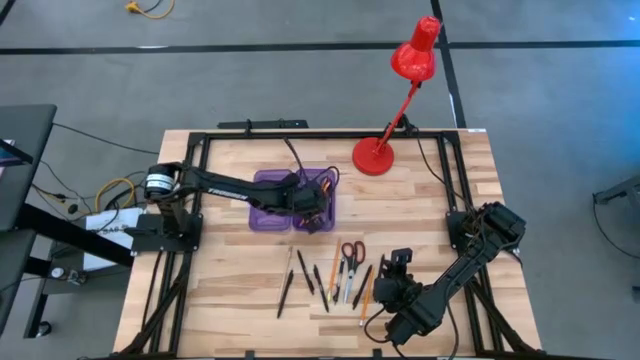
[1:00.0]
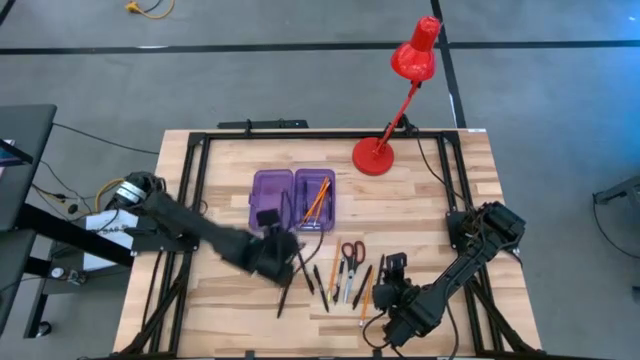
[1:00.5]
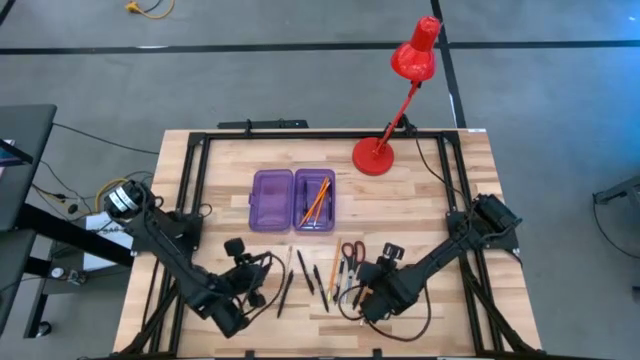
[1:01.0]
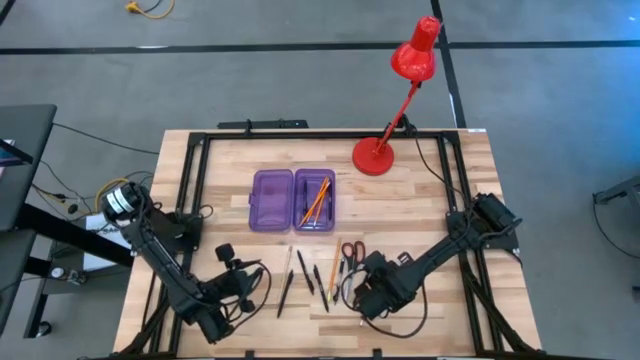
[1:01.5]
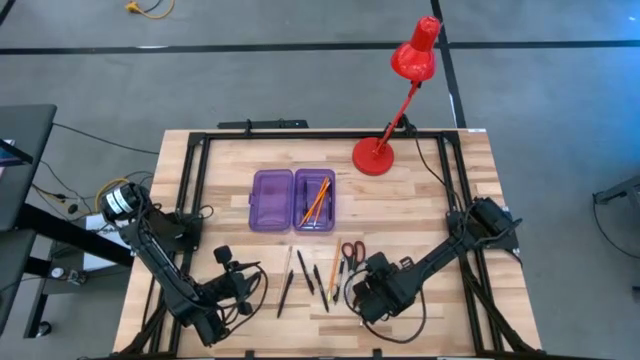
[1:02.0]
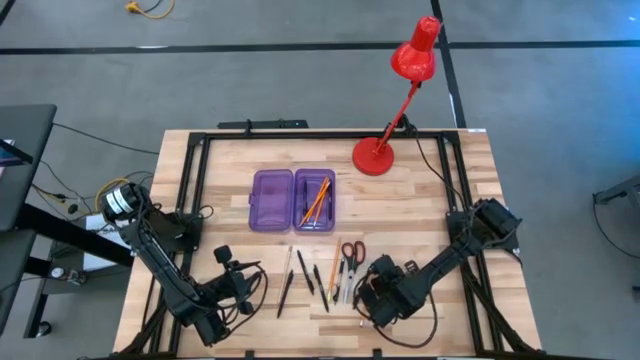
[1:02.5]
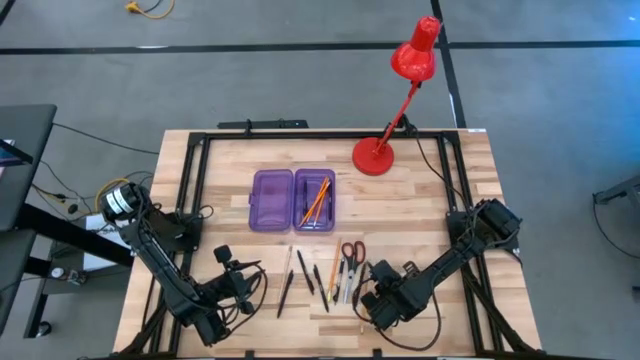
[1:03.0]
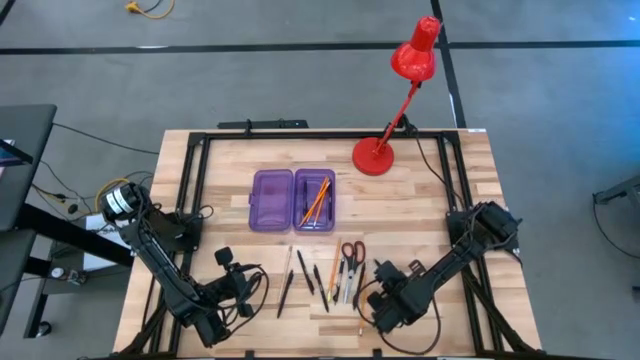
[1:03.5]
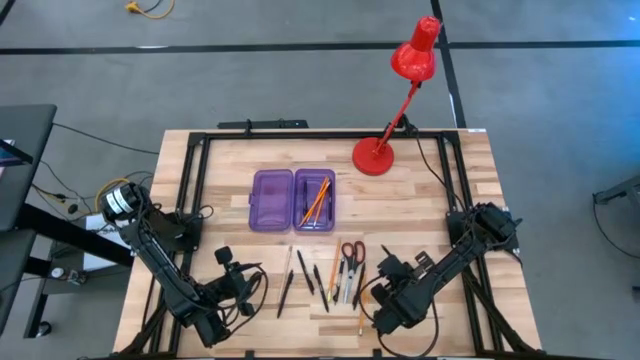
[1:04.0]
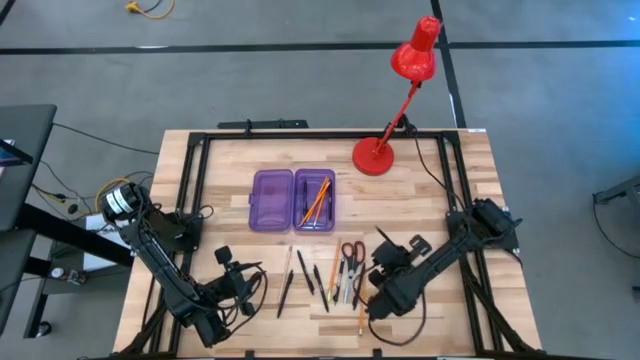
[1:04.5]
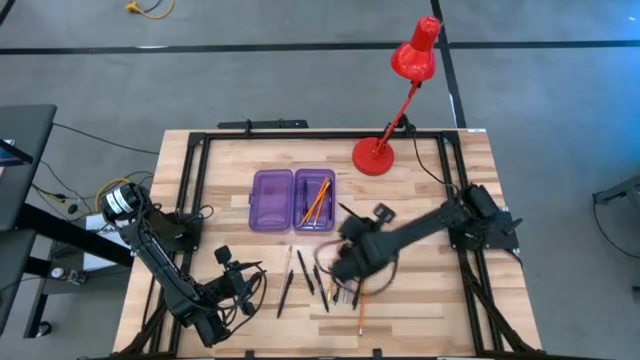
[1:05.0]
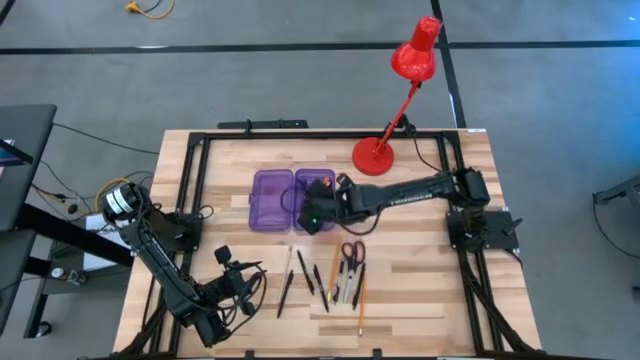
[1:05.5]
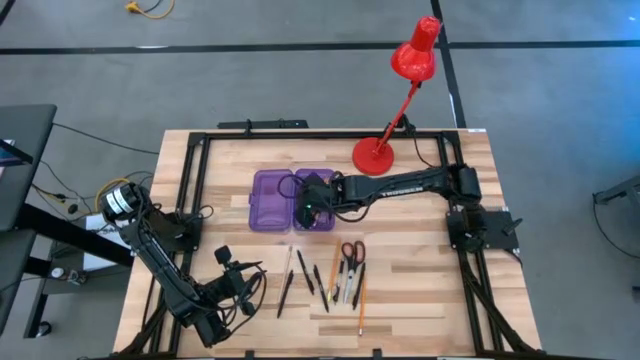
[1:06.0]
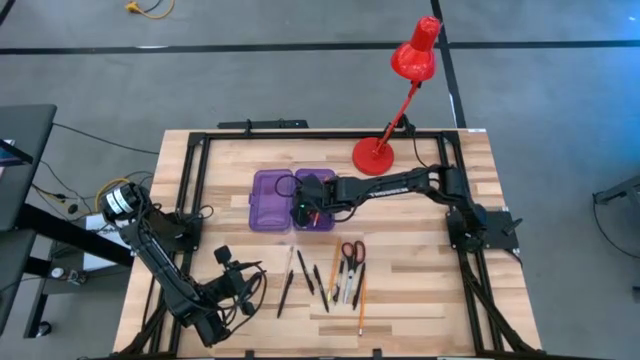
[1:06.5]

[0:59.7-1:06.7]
Task: Pick & place school supplies into a supply box
Put the black pen into the violet supply box

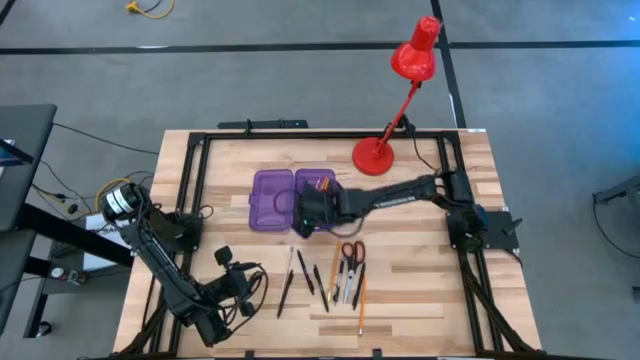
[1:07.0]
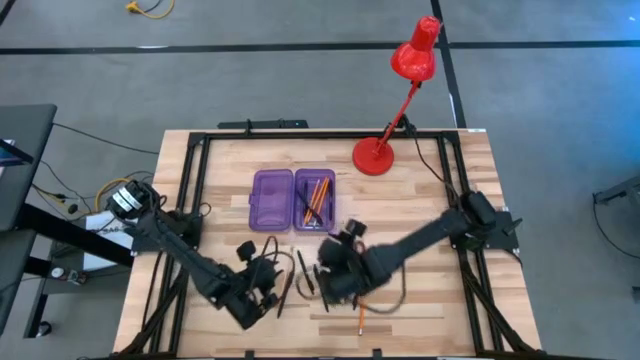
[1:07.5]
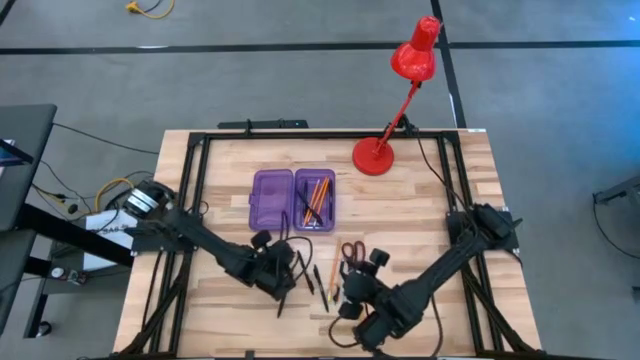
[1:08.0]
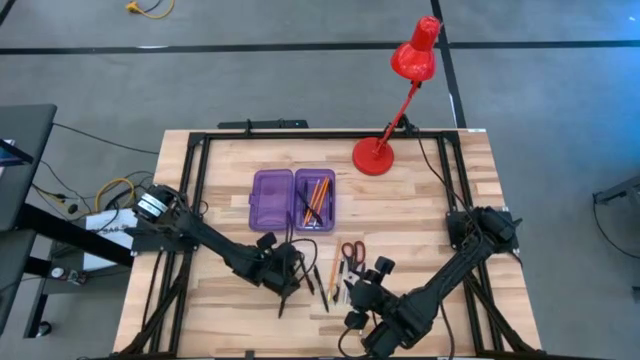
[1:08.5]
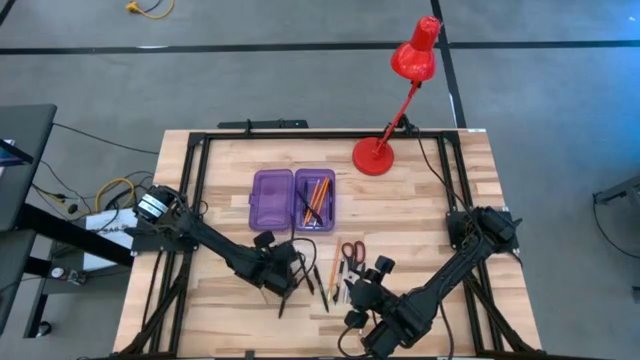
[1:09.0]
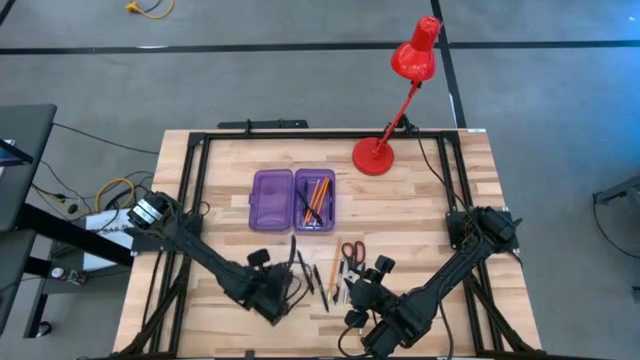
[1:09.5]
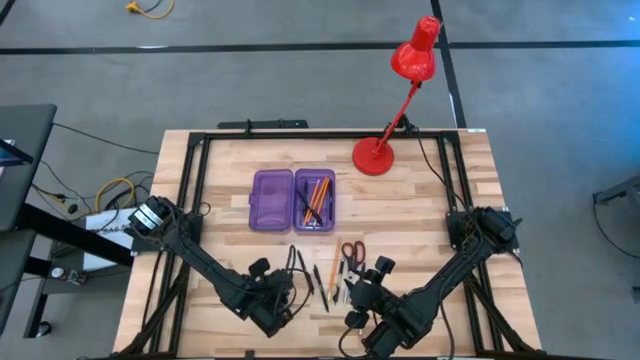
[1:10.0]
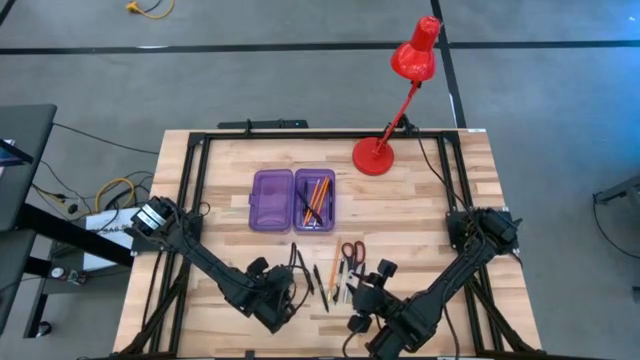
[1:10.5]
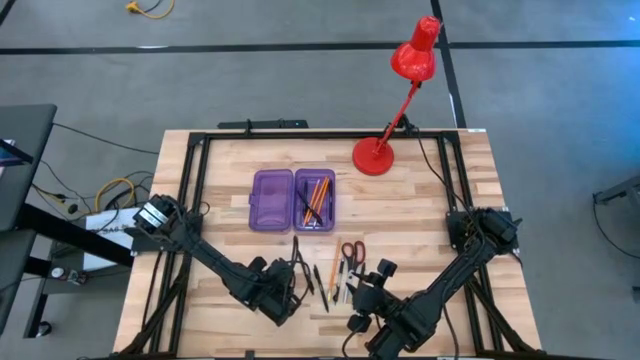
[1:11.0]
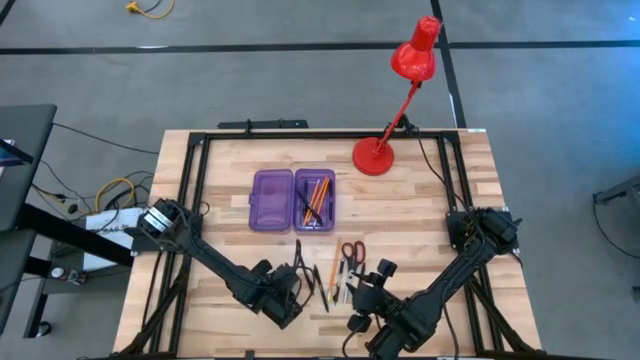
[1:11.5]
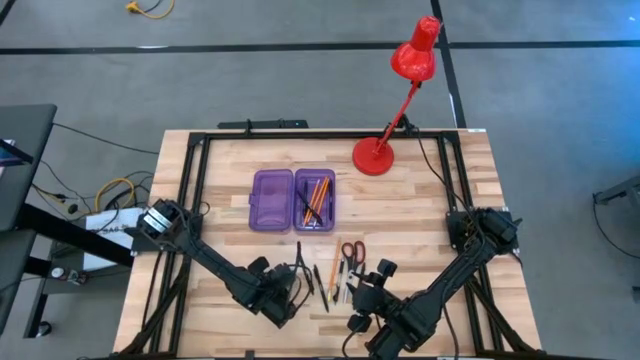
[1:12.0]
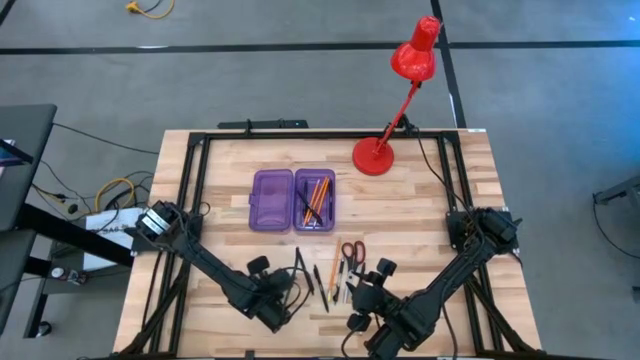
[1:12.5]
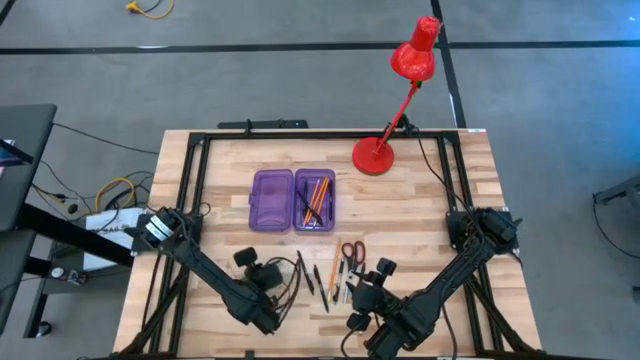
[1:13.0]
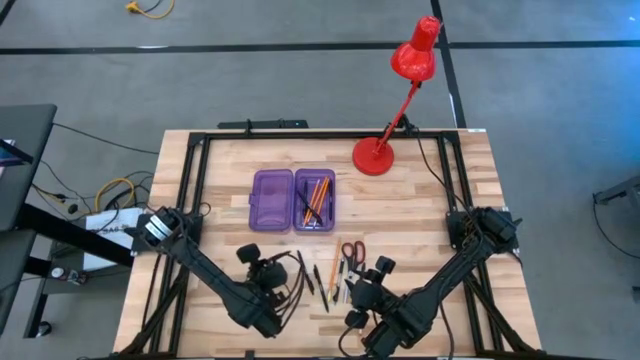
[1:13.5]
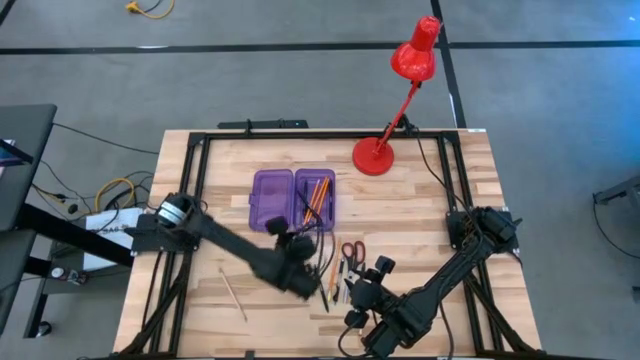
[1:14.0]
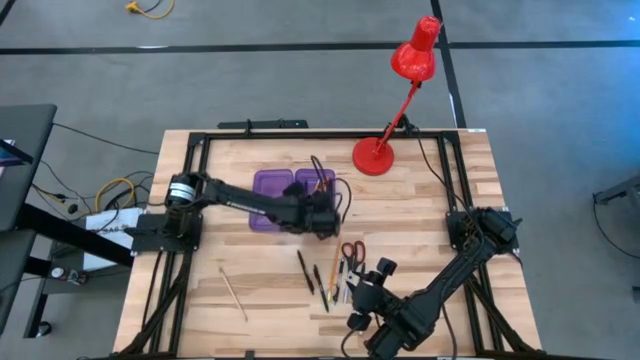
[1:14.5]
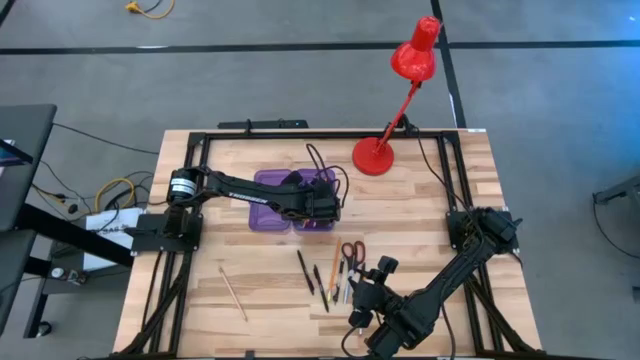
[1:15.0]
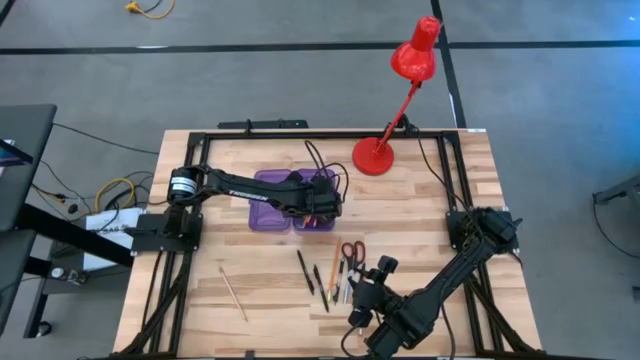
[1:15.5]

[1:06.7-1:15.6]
Put the black pen into the violet supply box

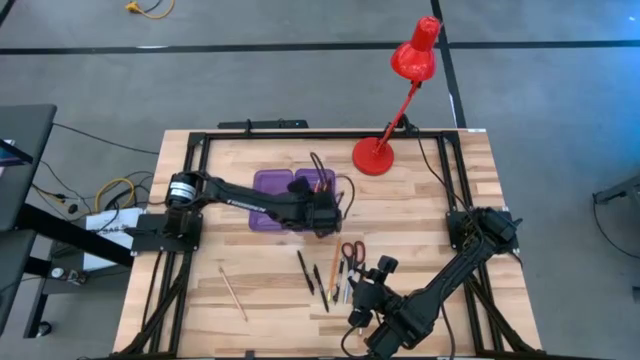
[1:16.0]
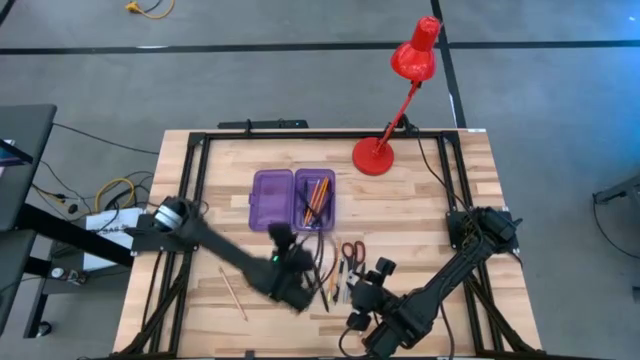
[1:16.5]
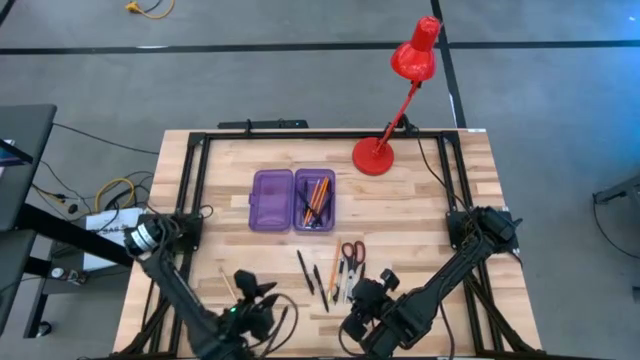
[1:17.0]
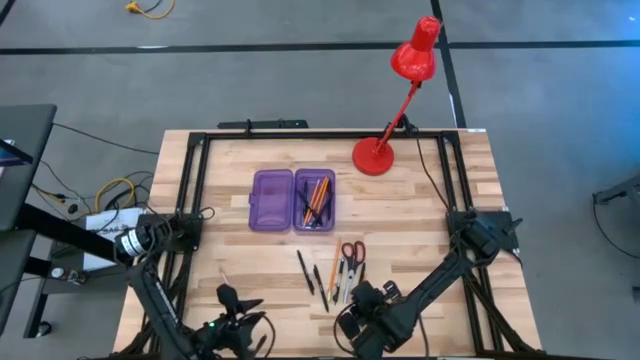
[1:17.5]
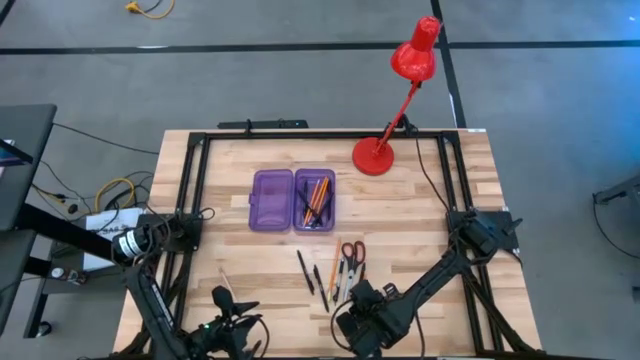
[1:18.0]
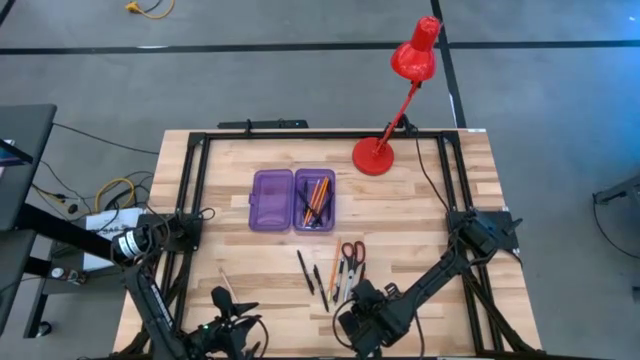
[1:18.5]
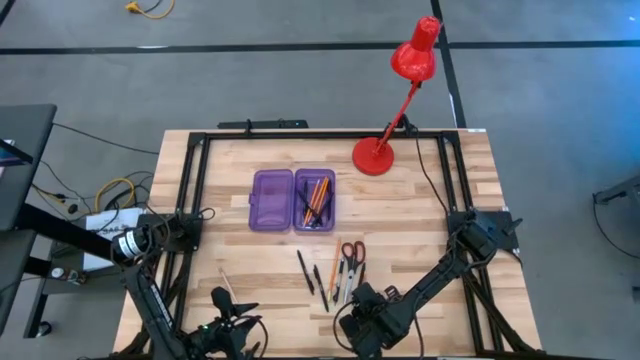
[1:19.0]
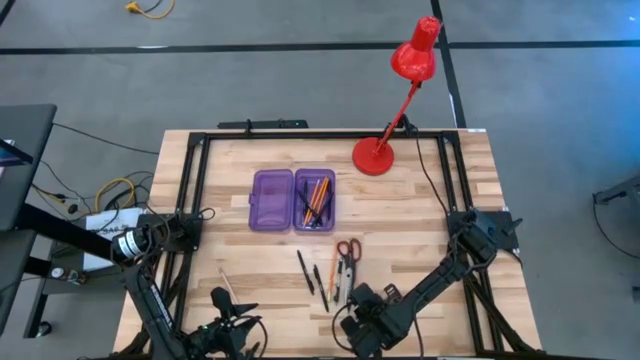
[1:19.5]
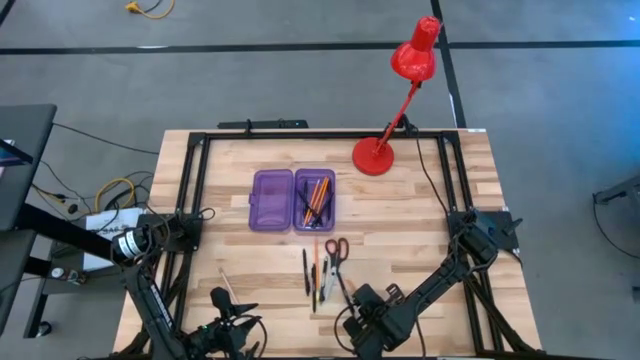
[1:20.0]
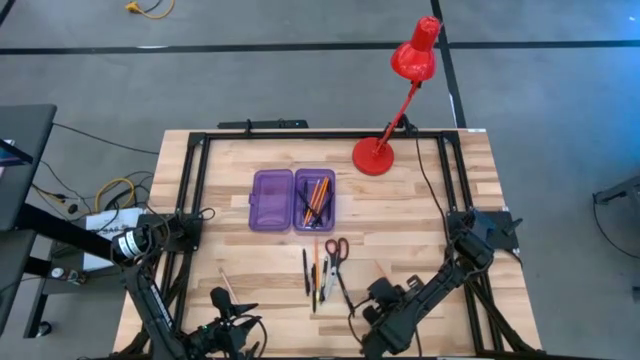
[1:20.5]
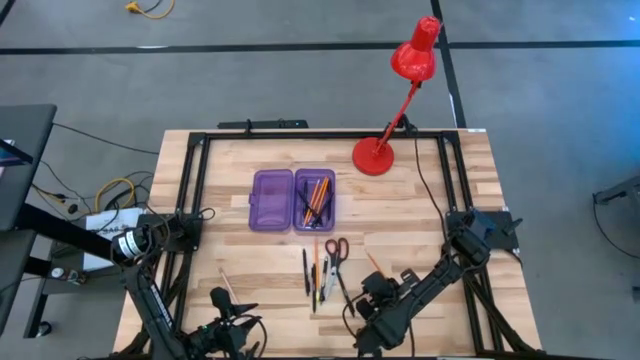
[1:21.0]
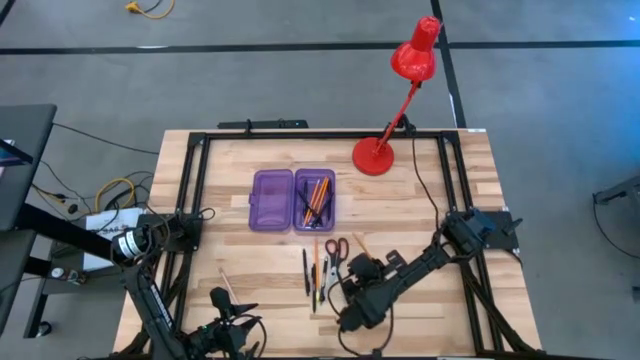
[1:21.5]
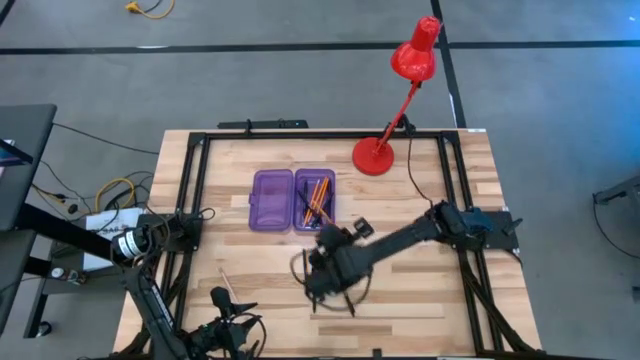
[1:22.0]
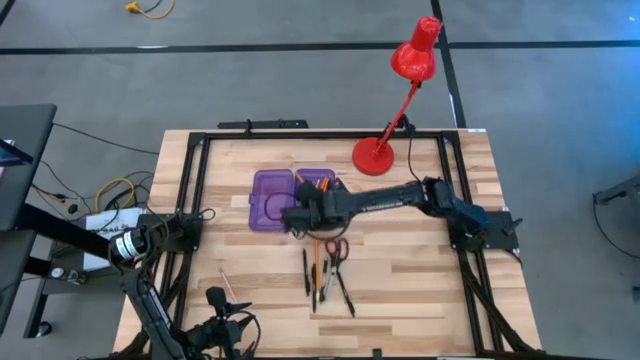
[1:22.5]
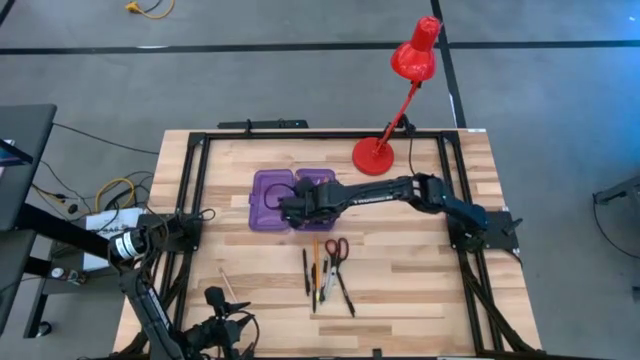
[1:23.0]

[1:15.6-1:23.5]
Put the orange pencil into the violet supply box
